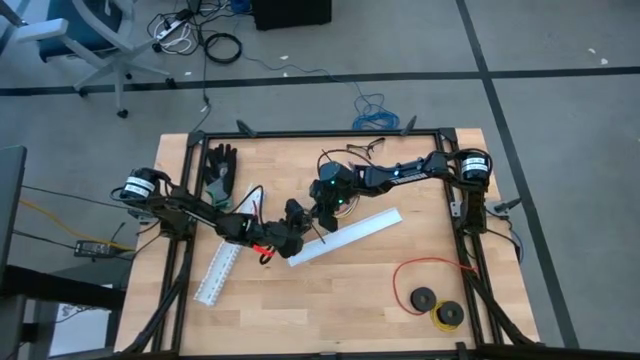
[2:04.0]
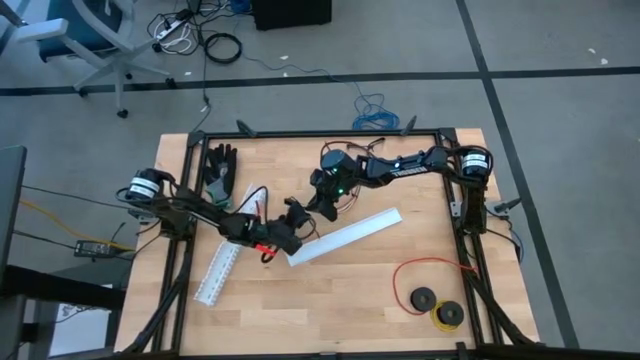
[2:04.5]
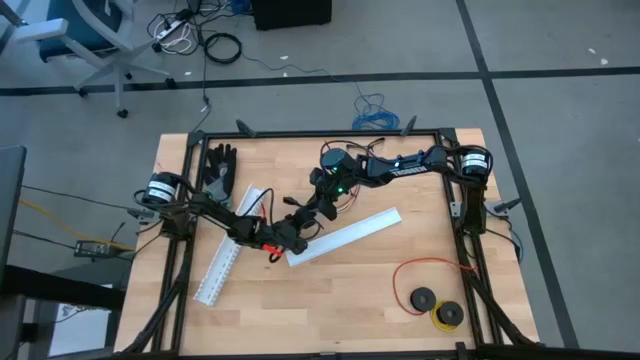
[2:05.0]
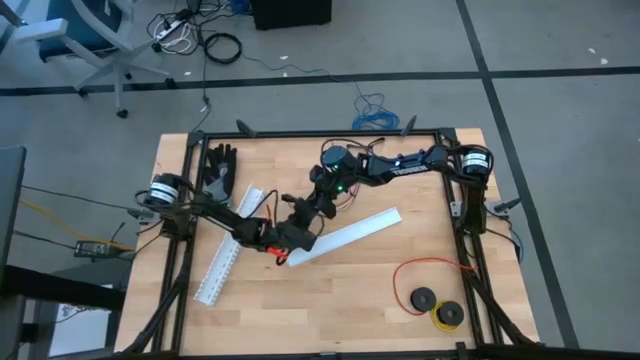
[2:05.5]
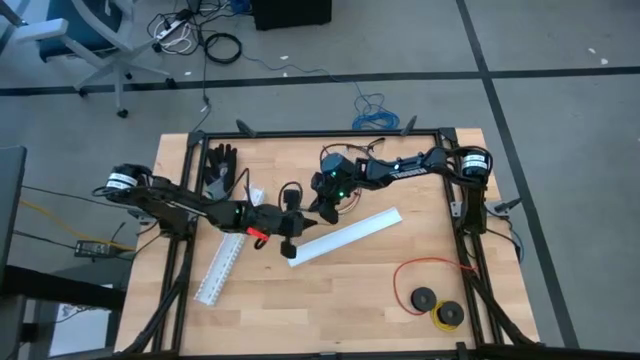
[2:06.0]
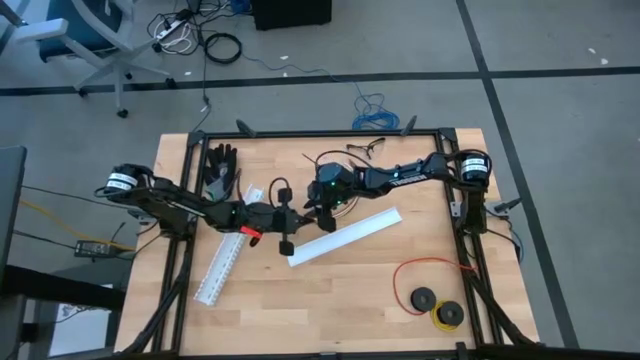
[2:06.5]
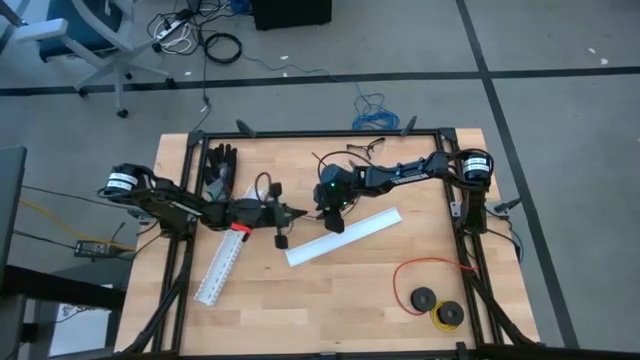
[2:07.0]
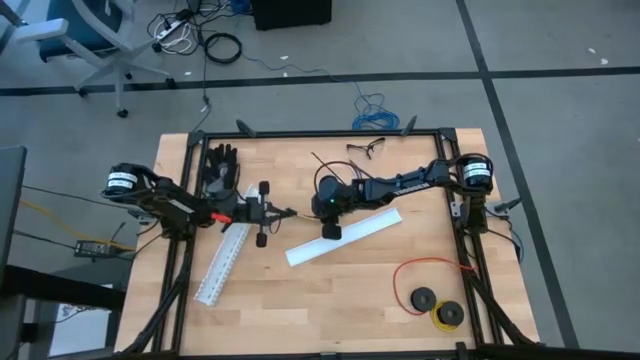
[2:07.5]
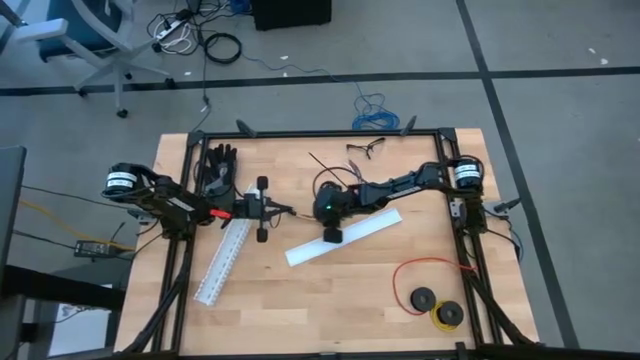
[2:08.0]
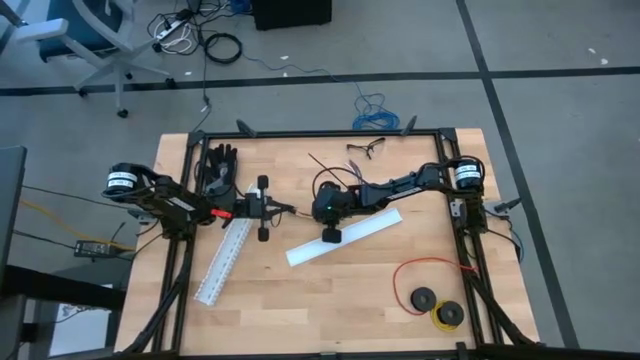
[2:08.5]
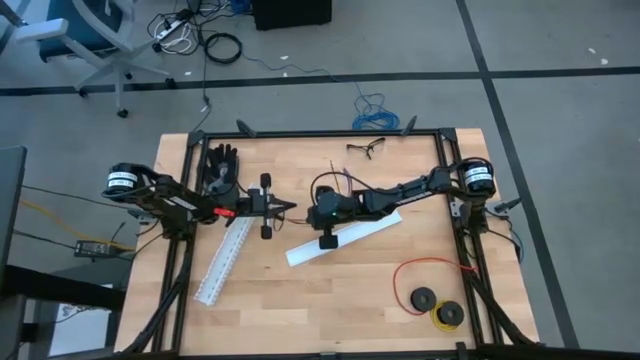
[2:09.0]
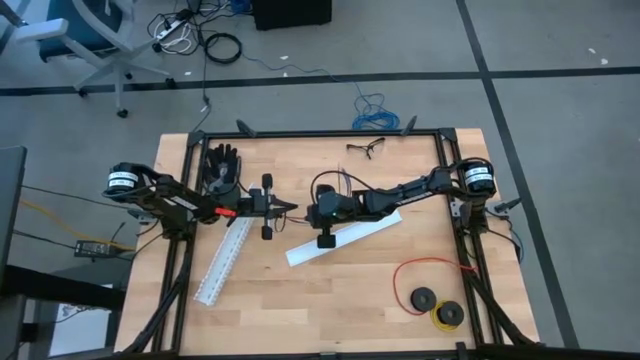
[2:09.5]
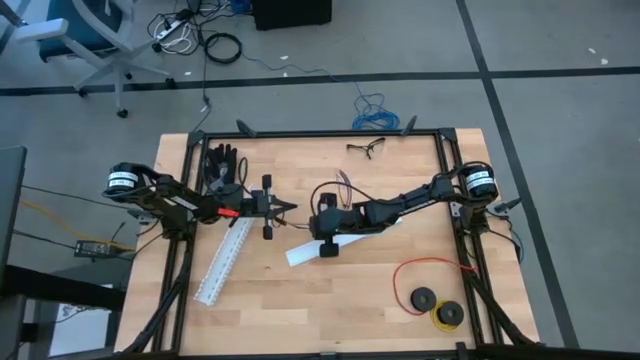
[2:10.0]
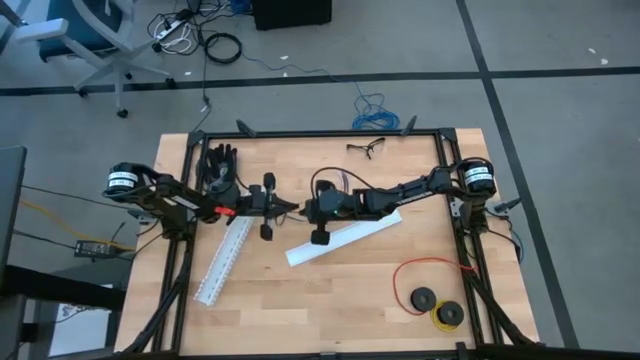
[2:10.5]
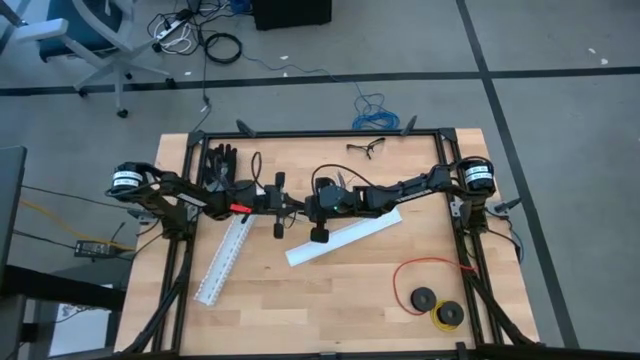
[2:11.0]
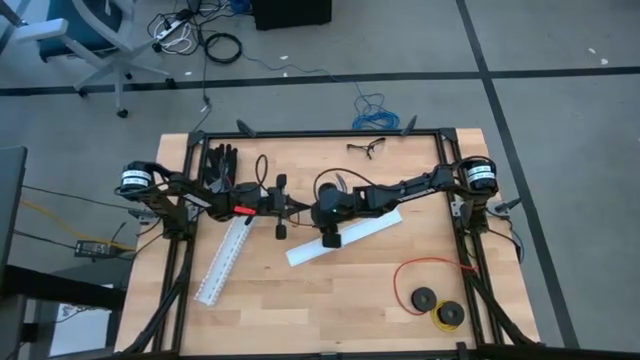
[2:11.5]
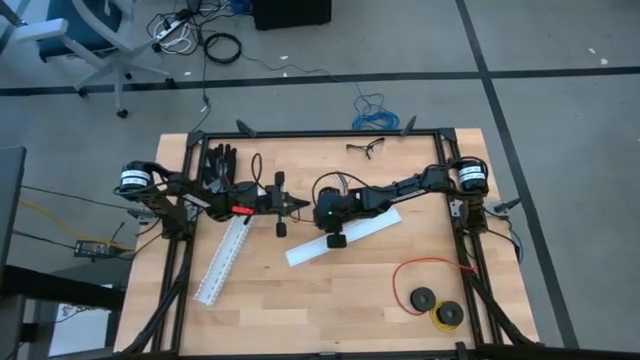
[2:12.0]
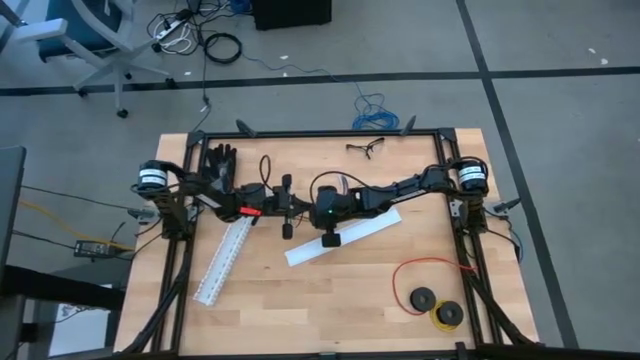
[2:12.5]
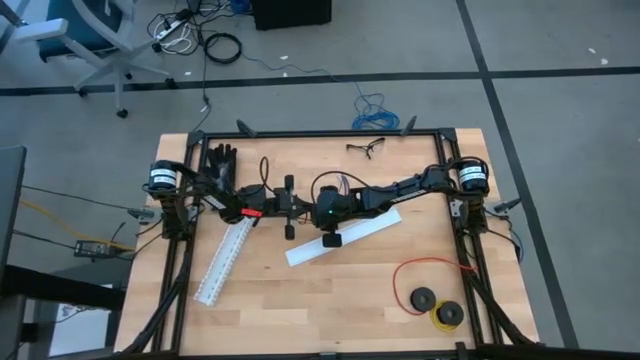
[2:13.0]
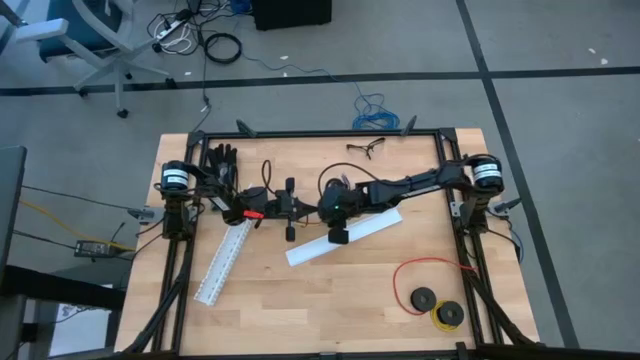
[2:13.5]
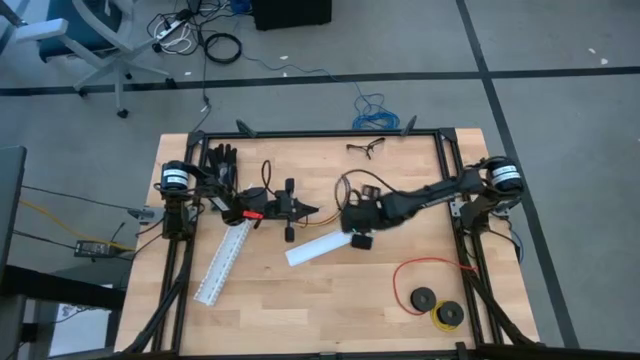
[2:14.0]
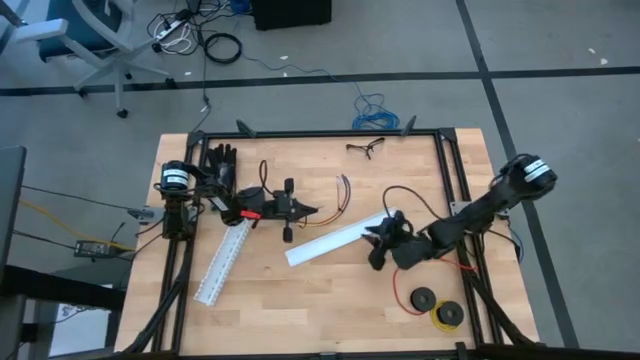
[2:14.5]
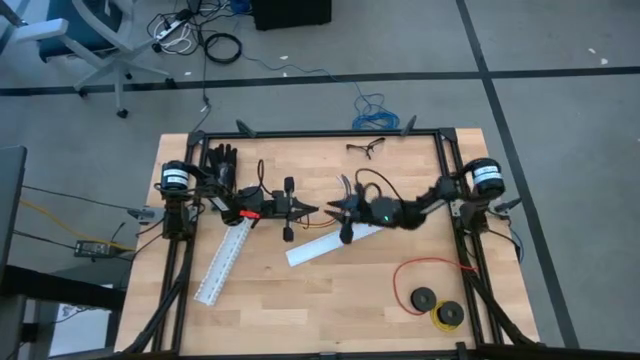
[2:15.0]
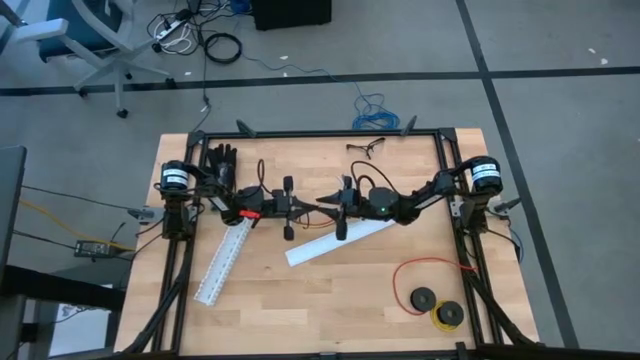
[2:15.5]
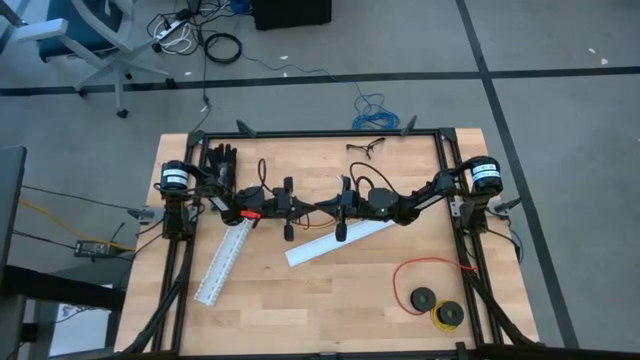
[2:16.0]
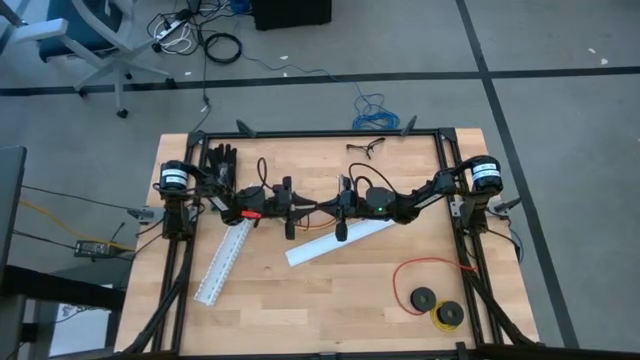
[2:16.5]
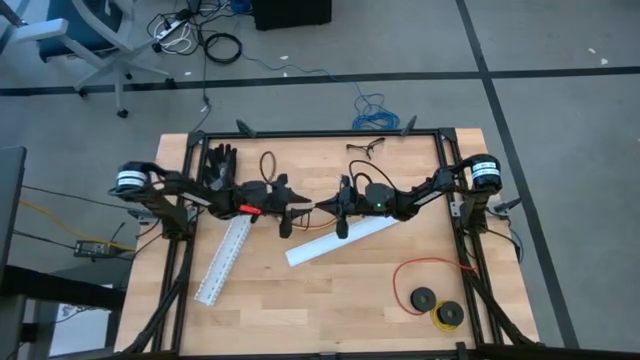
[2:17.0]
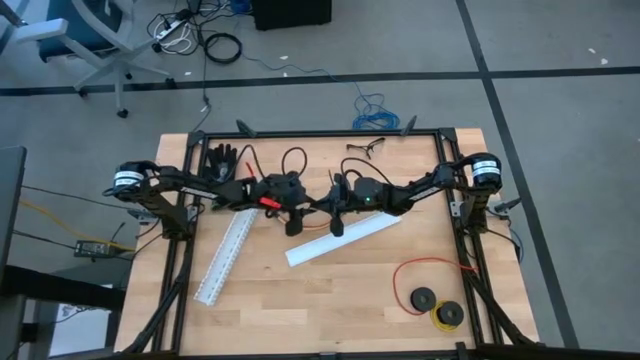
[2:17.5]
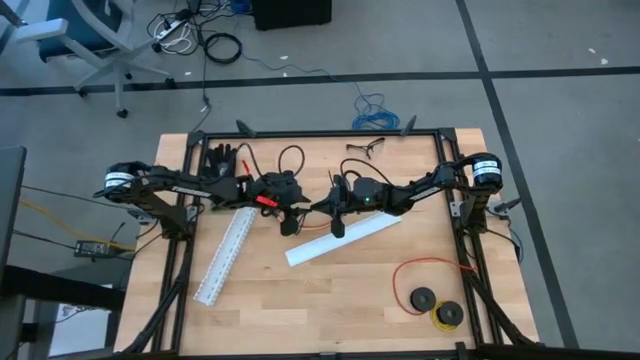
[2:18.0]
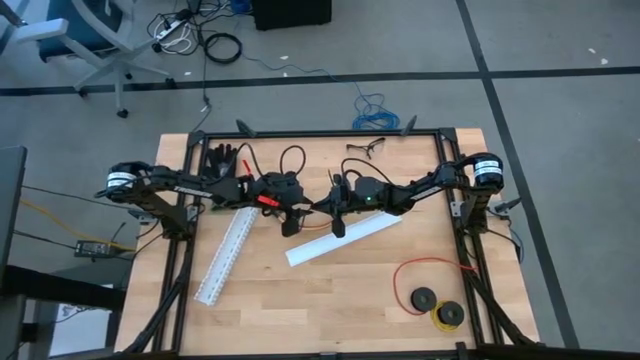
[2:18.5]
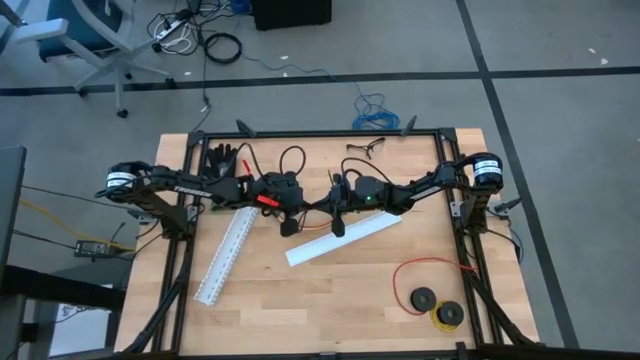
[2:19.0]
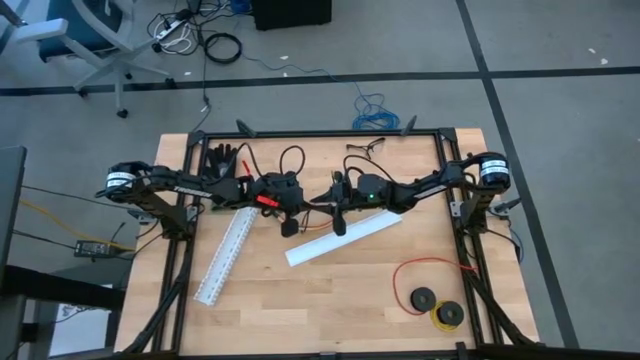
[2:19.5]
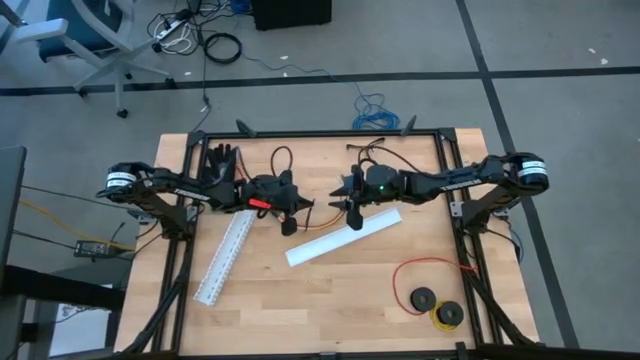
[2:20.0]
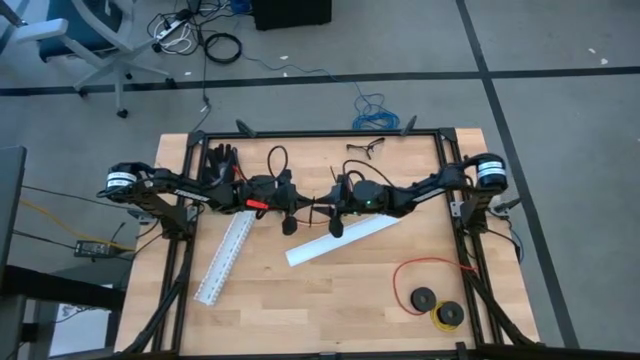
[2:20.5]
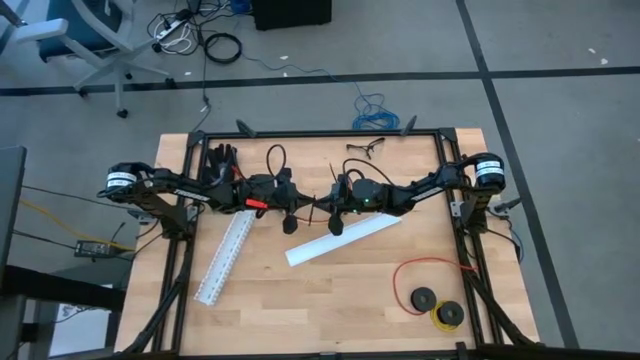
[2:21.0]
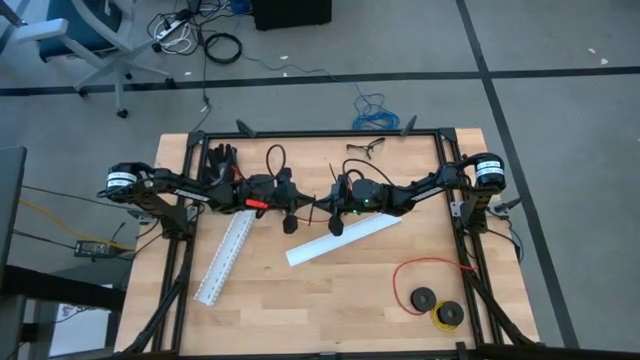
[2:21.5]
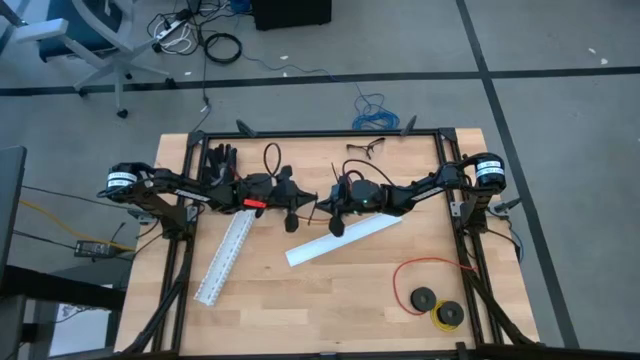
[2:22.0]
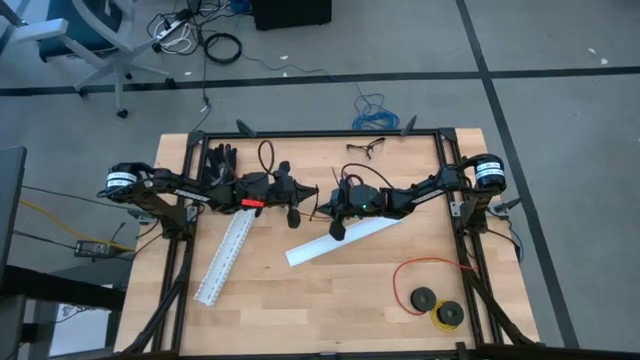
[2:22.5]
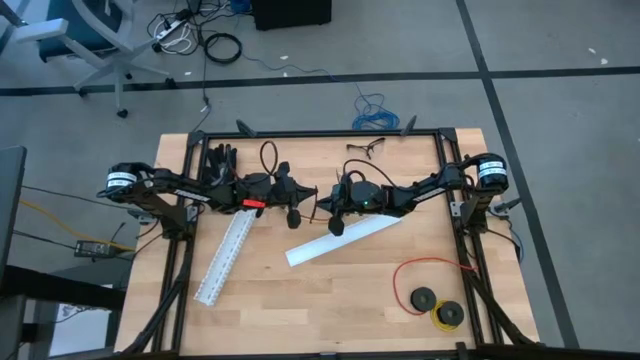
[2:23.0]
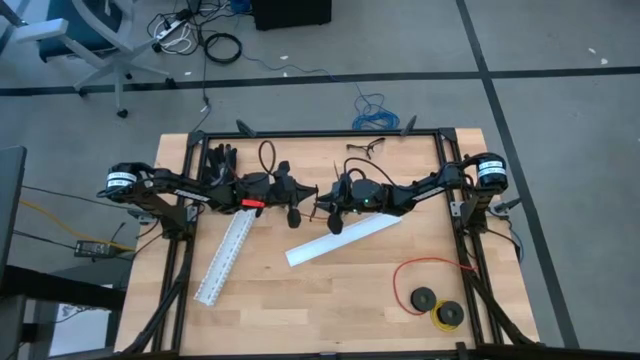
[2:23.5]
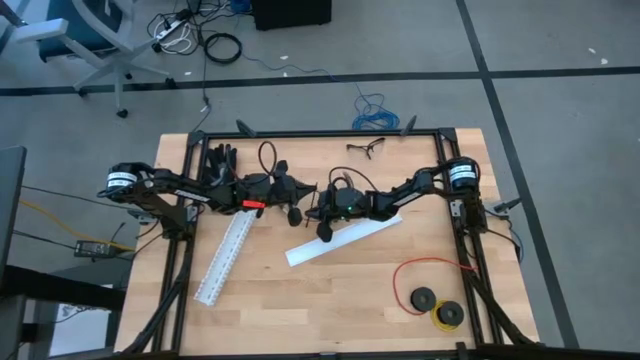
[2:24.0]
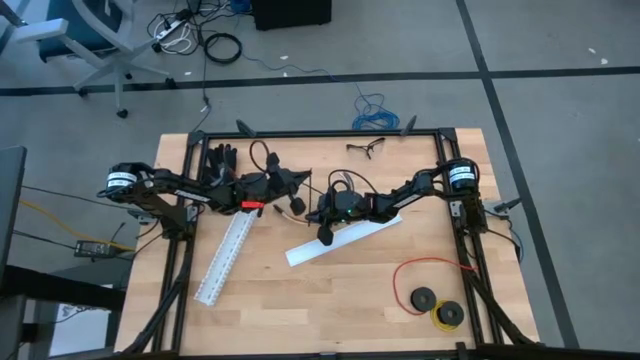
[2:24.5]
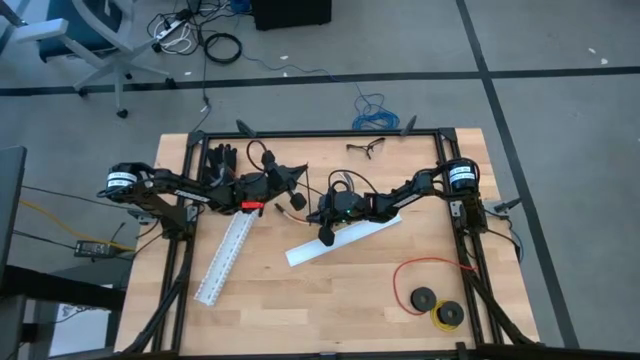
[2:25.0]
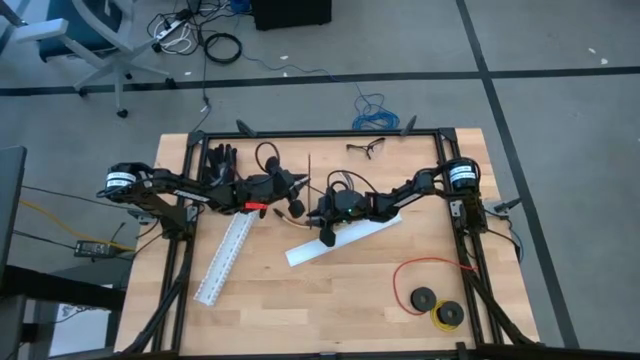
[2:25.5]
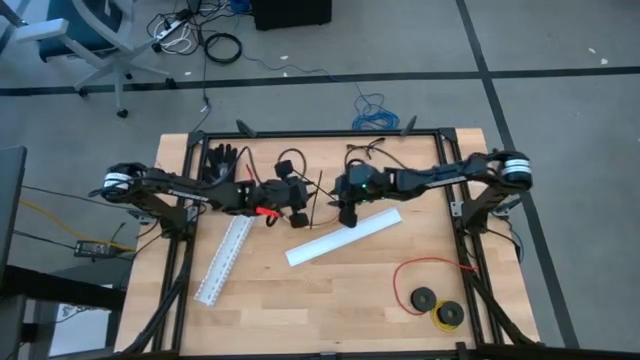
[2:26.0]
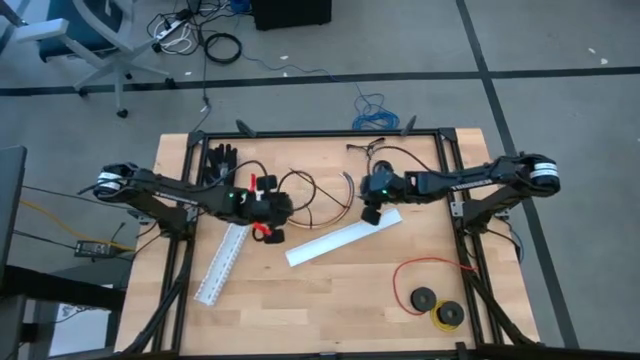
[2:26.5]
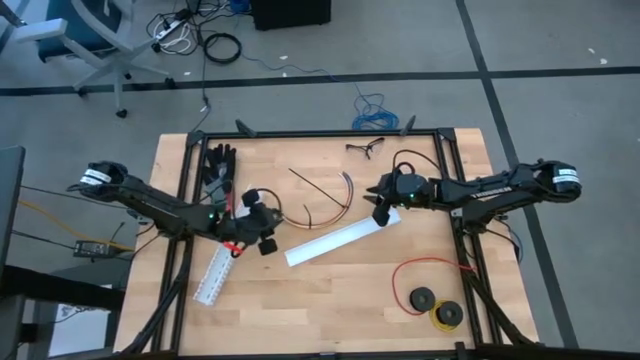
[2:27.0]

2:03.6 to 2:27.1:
Task: Ziptie cables
Wrap the cables together using a zip tie
